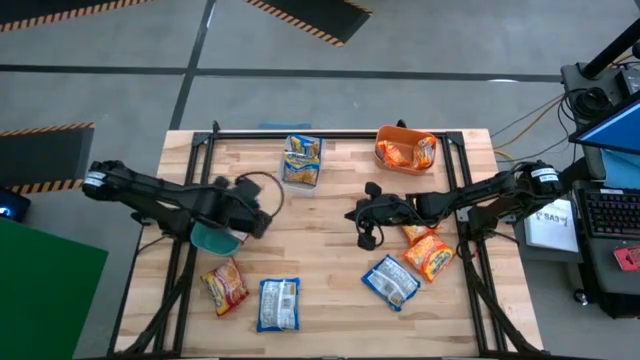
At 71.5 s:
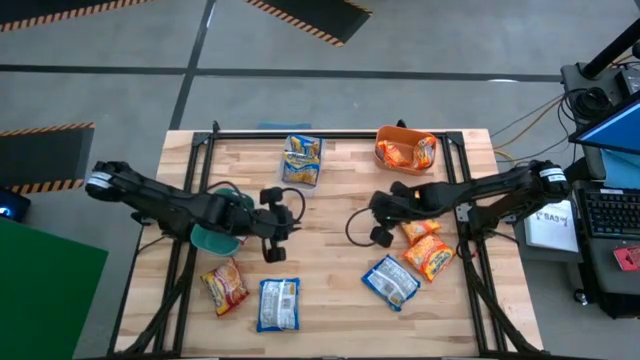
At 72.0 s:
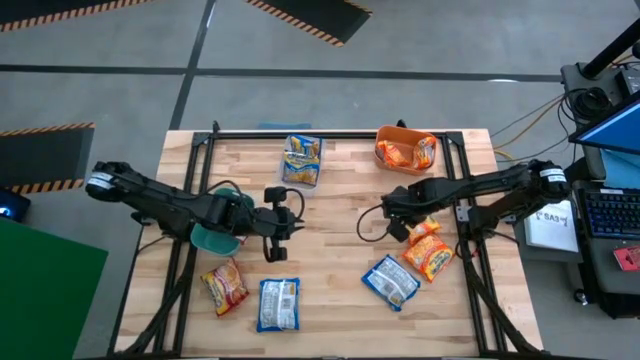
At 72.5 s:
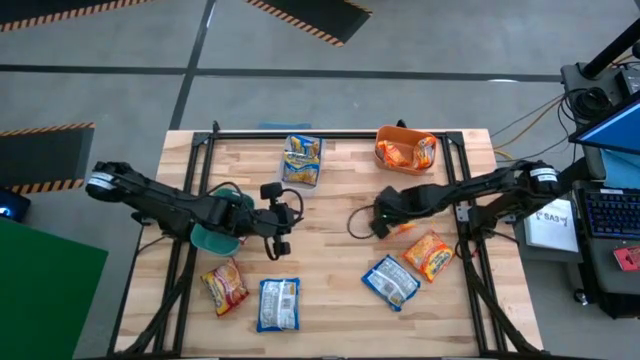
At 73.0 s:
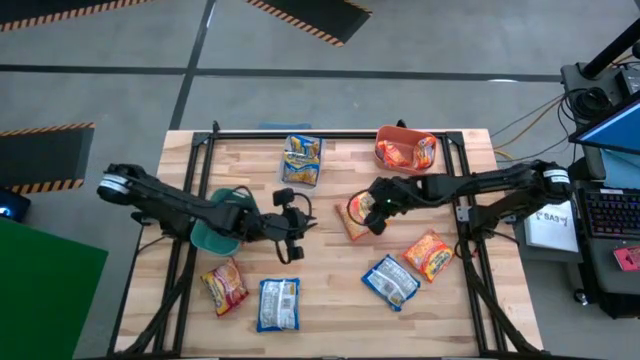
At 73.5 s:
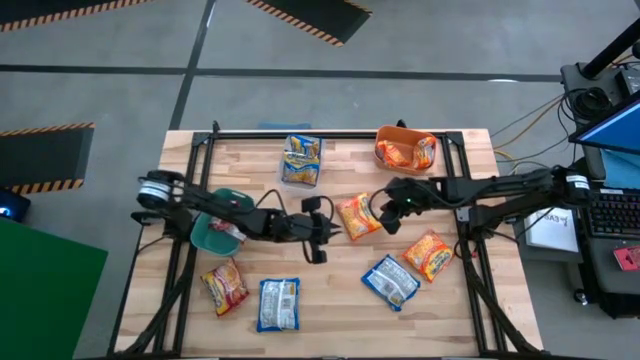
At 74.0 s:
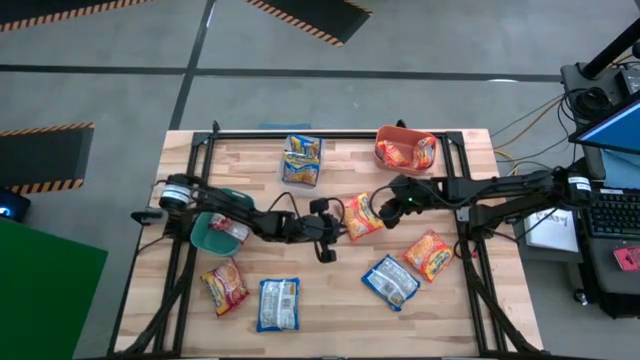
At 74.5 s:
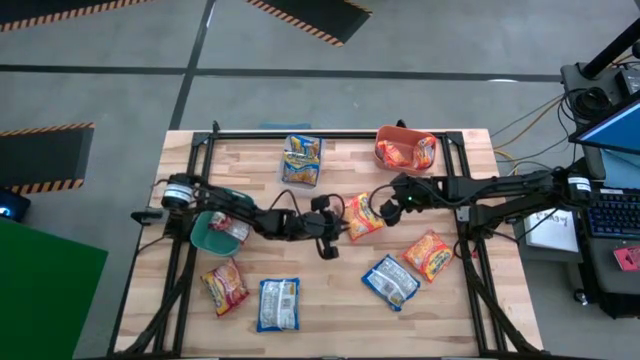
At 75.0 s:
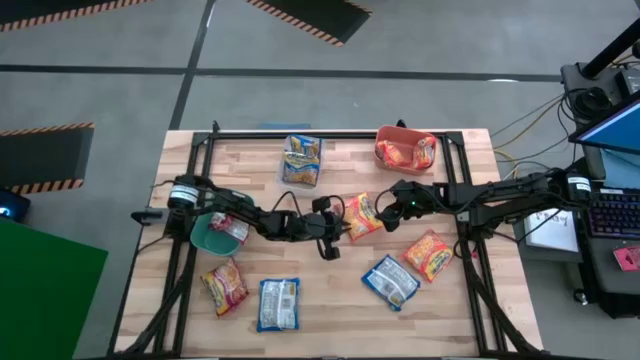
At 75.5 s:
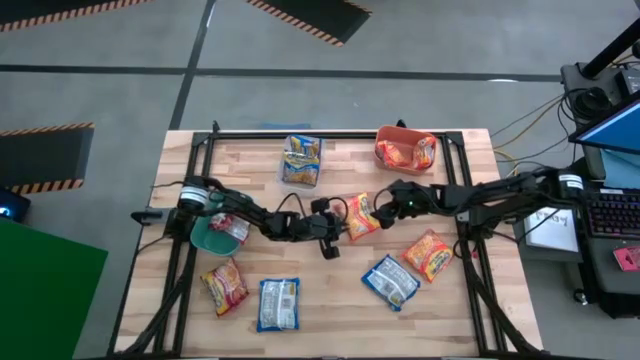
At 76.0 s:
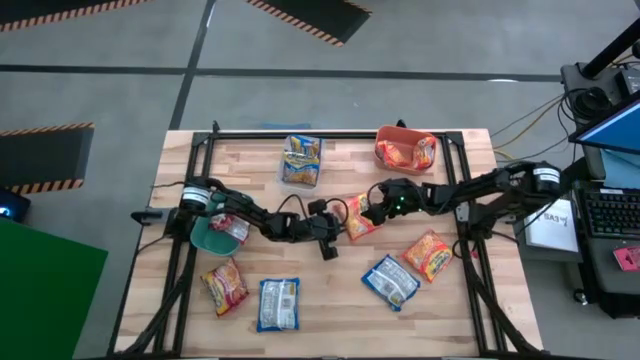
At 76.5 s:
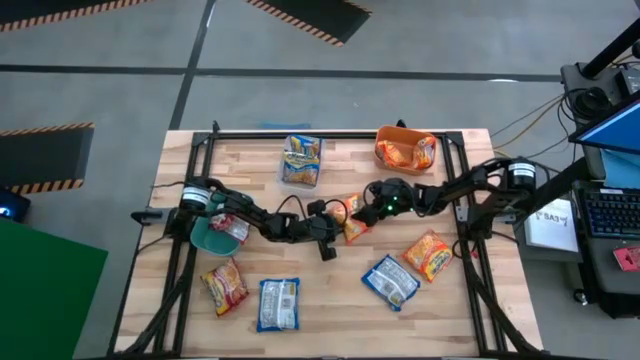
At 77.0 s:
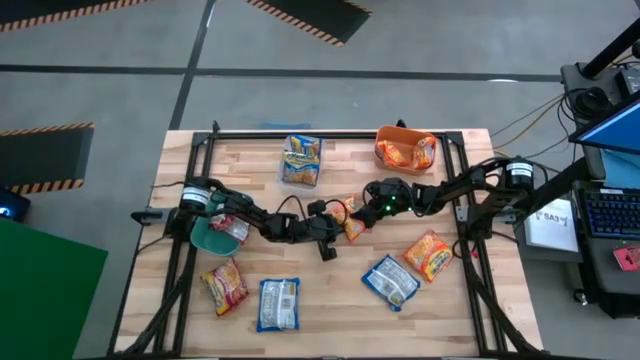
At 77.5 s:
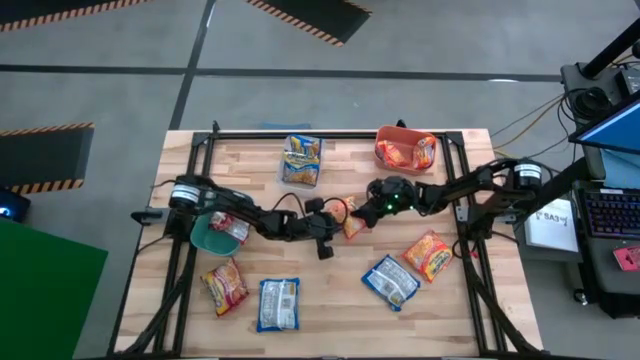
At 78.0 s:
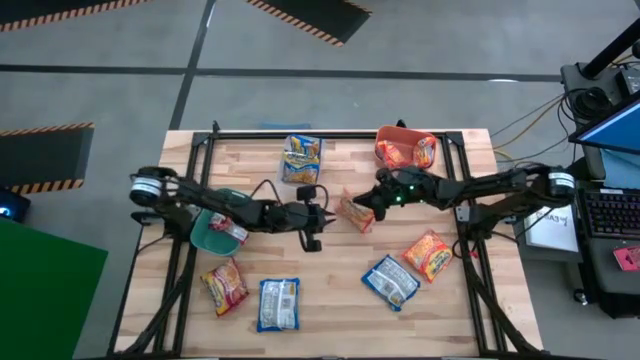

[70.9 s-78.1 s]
Task: Sort Maruchan noodles
Put the orange noodle pack into the blue bin

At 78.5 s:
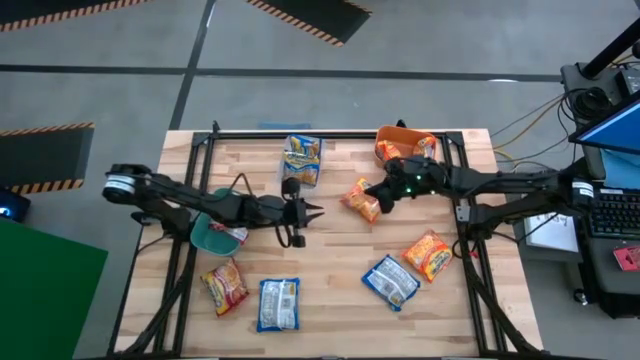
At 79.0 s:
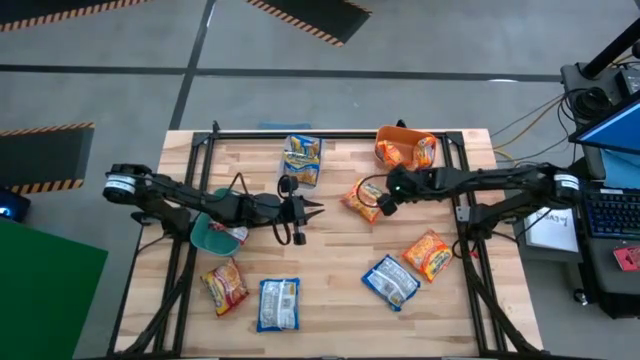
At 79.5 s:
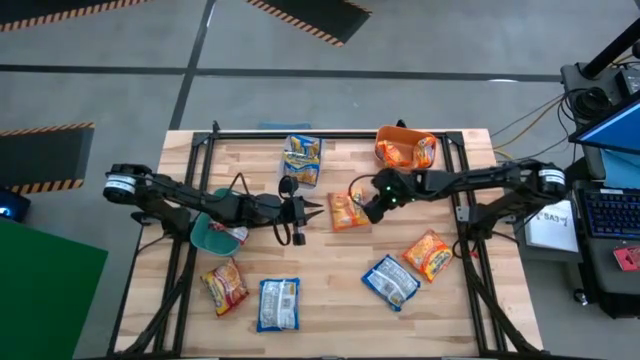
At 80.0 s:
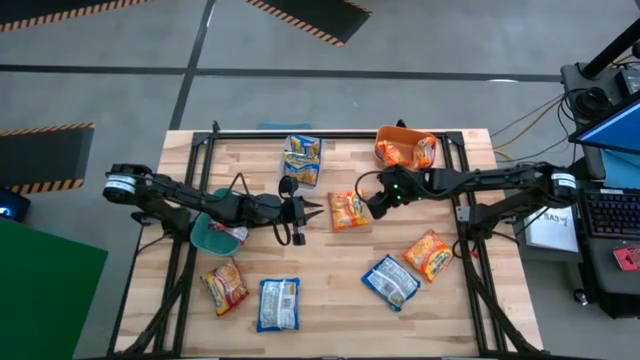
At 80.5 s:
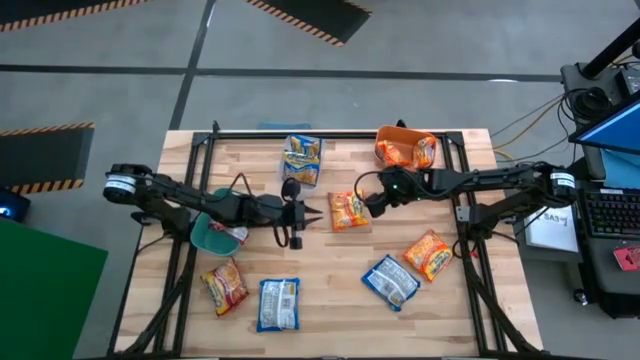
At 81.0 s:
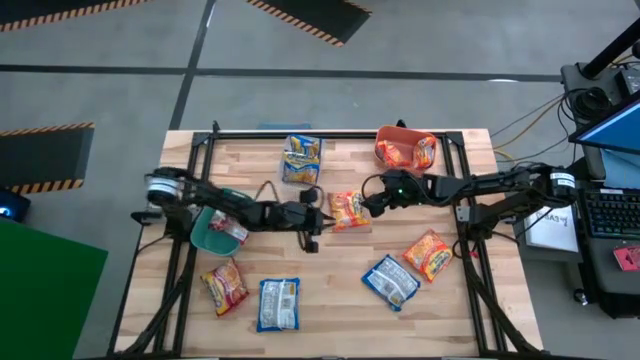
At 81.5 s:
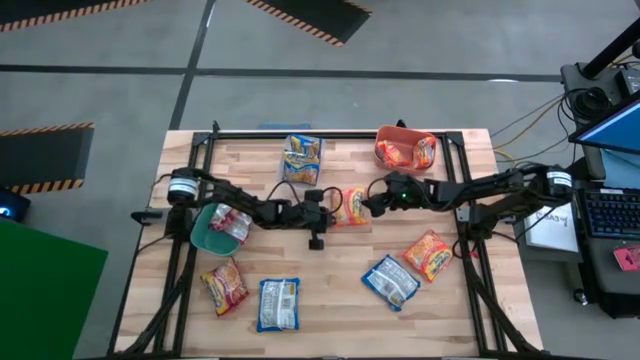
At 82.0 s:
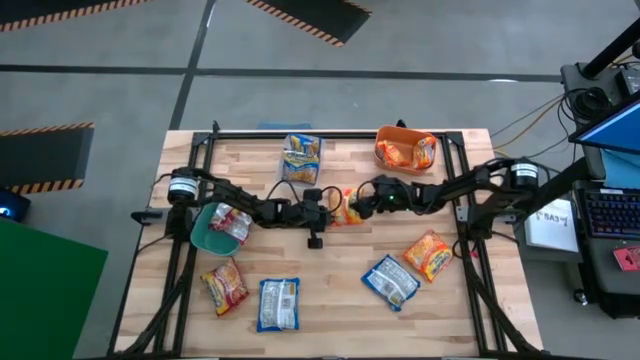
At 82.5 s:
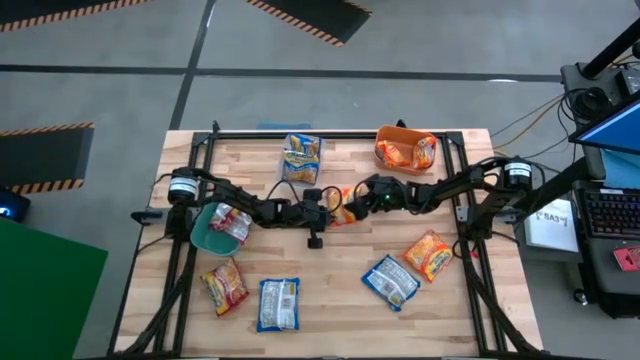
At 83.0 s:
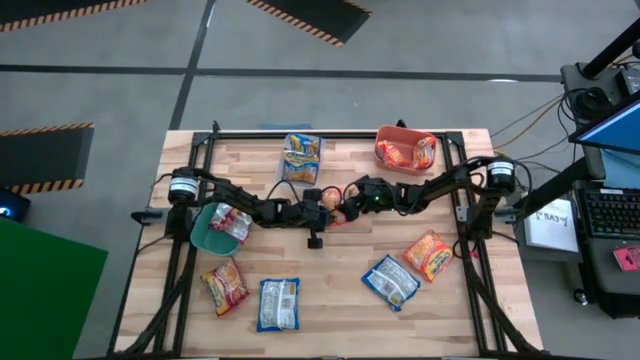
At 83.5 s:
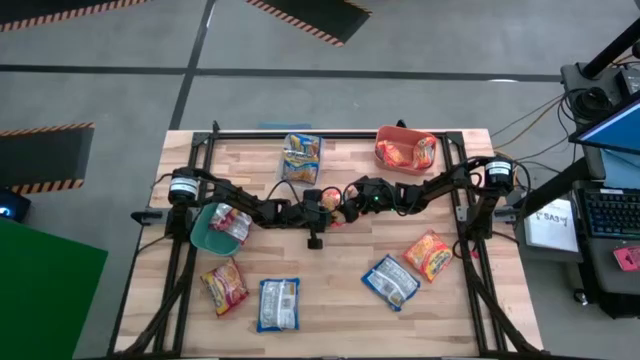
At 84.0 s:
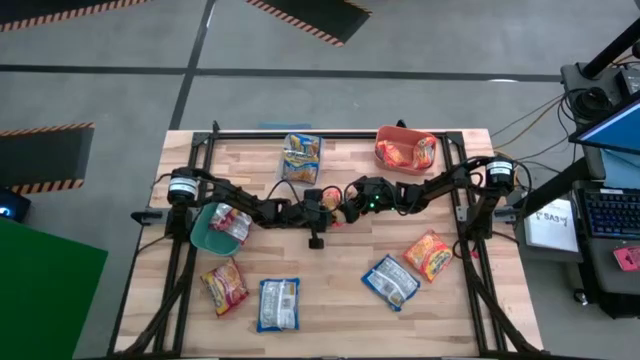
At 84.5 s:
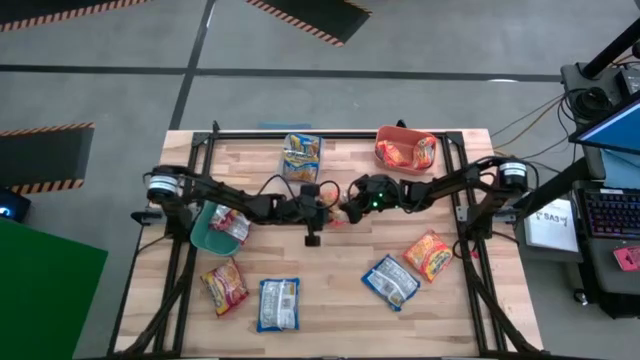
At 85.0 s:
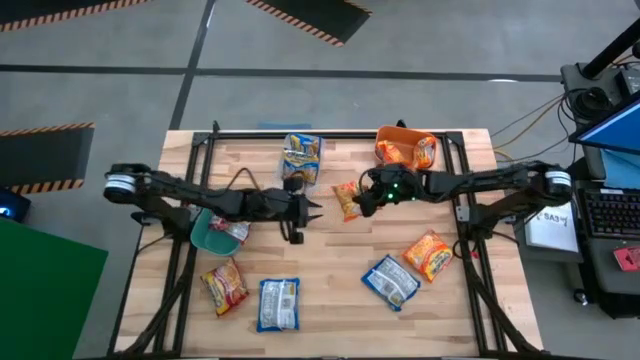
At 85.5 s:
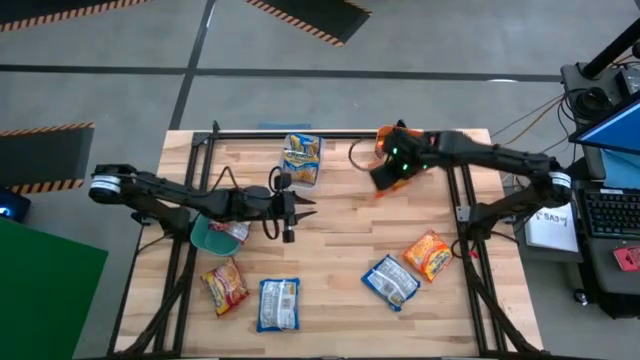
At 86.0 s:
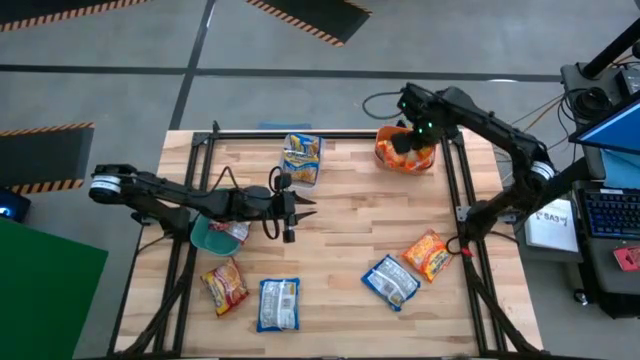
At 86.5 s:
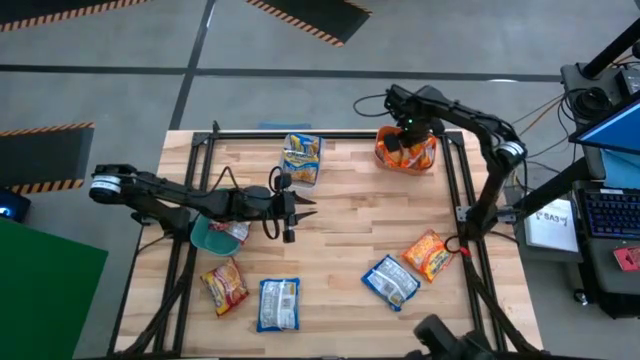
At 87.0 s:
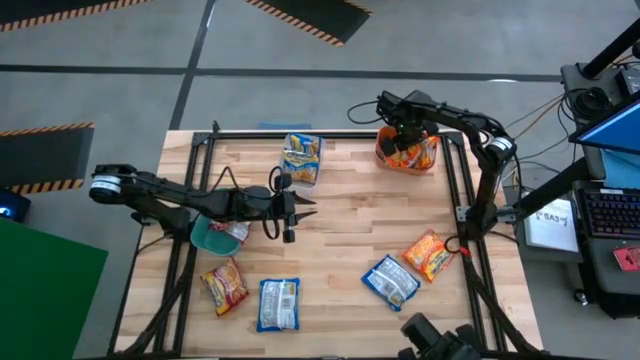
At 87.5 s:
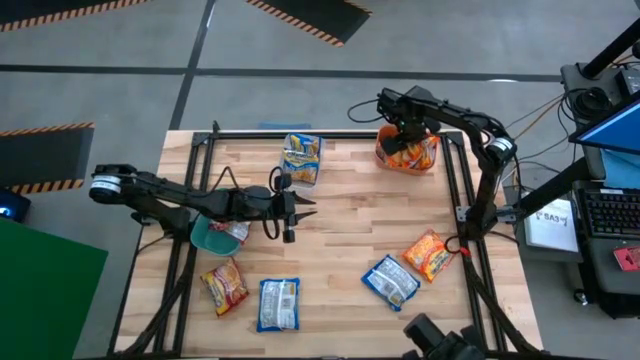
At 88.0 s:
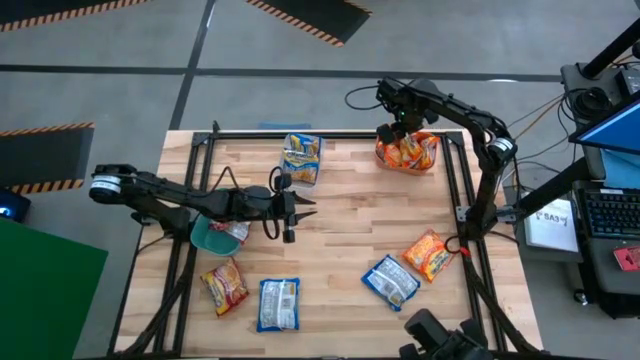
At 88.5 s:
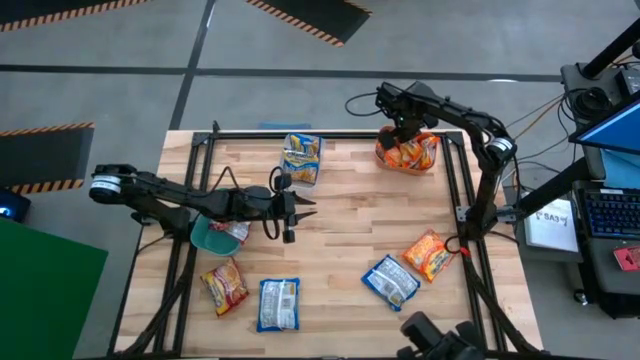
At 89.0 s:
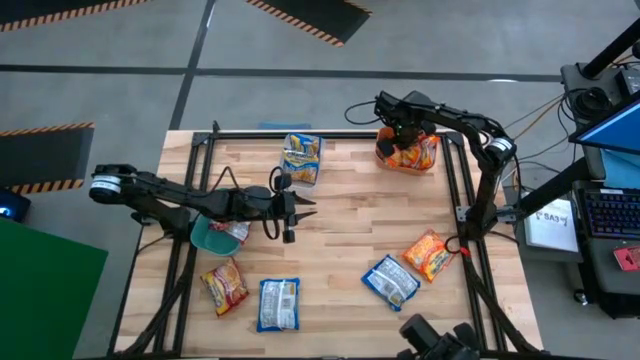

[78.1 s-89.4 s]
Put the orange noodle pack into the blue bin

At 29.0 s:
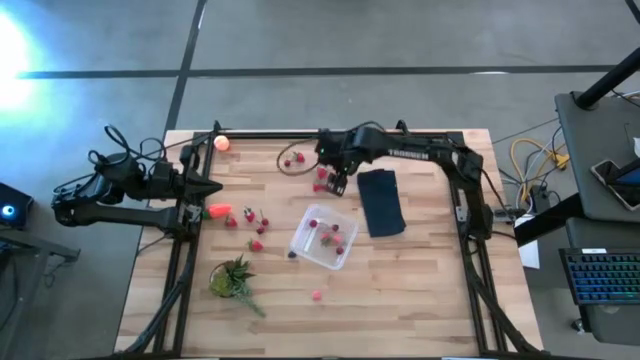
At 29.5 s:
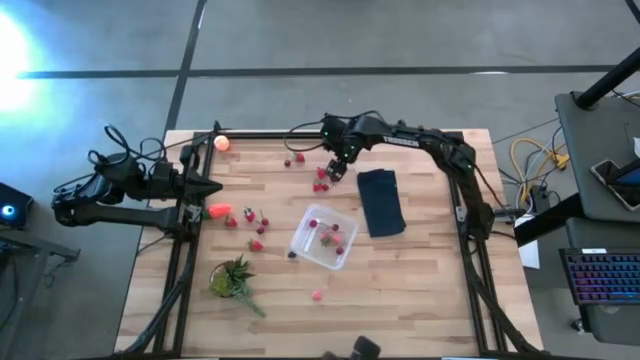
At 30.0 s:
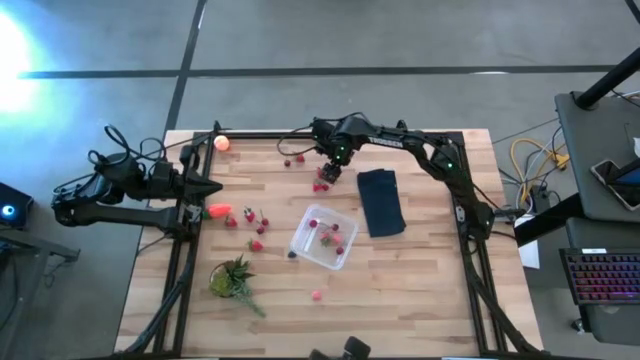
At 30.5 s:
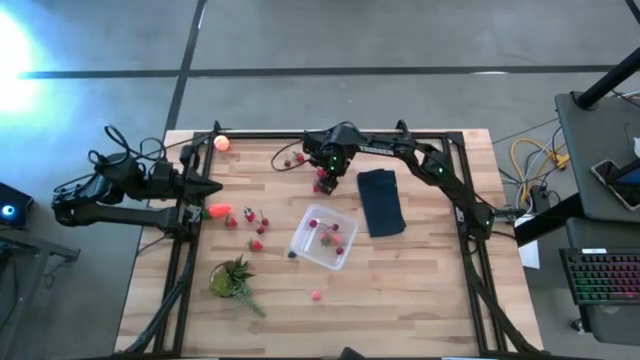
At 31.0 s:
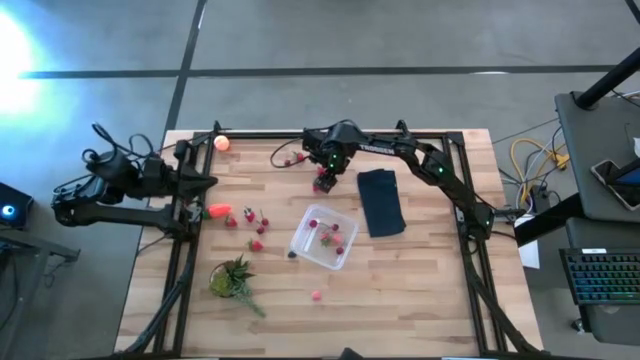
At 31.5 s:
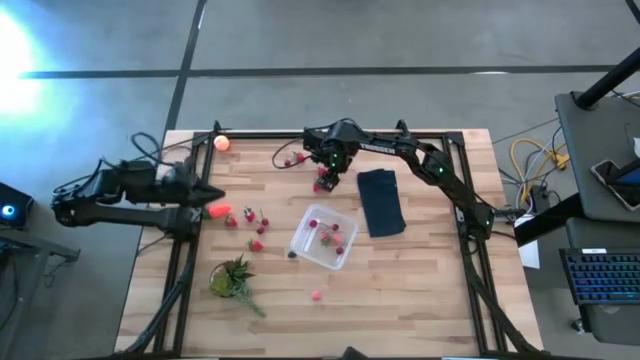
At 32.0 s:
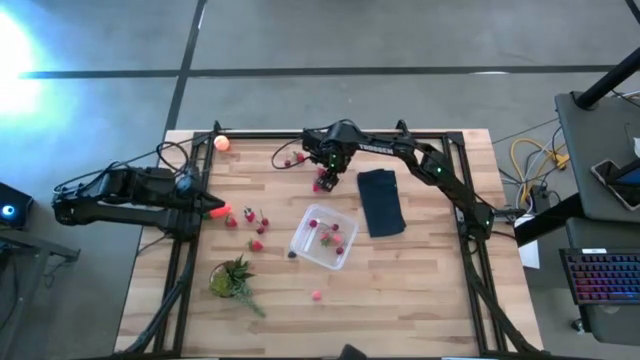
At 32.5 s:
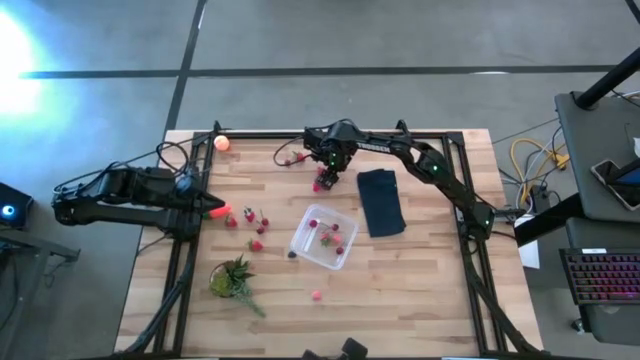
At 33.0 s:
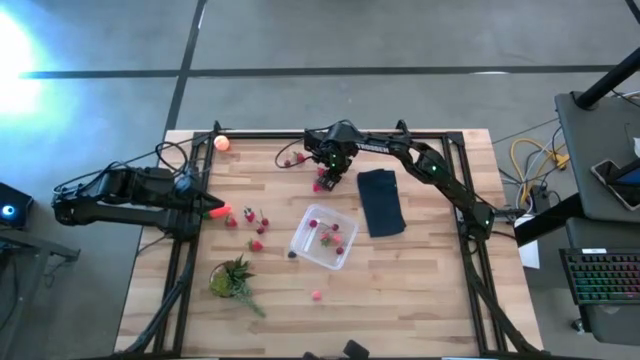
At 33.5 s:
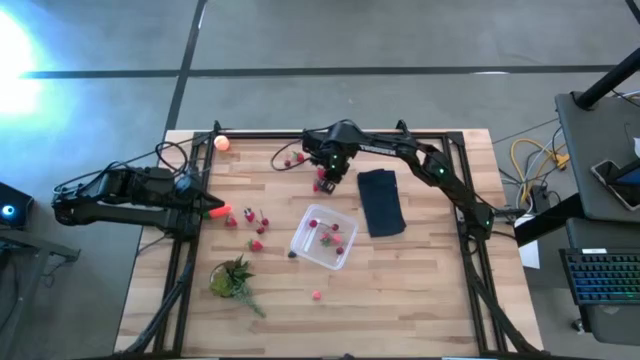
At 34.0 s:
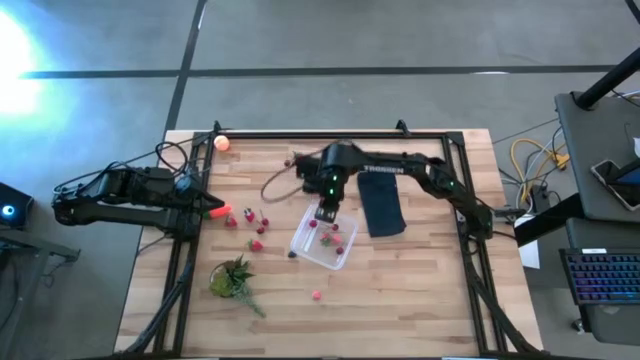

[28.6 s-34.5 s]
Task: Pick and placing Produce into tupperware
Put the red cherry into the transparent bin
